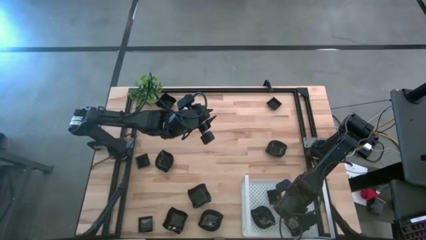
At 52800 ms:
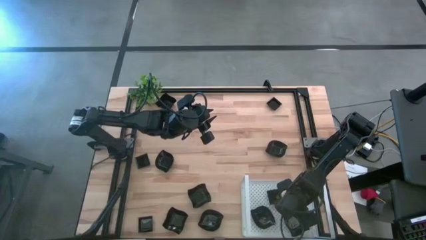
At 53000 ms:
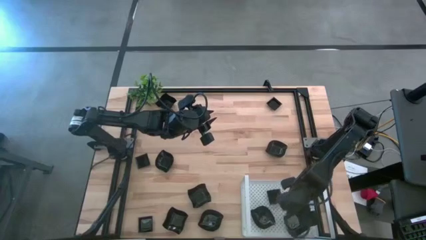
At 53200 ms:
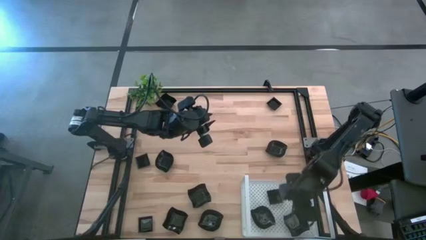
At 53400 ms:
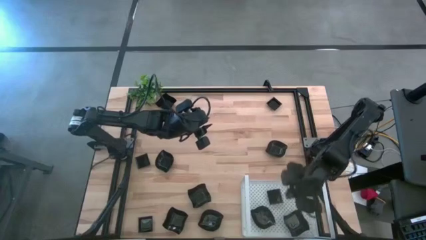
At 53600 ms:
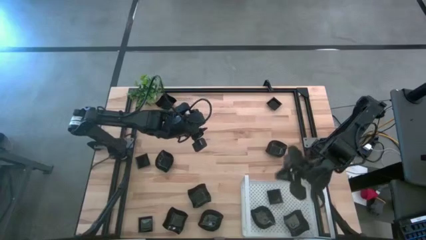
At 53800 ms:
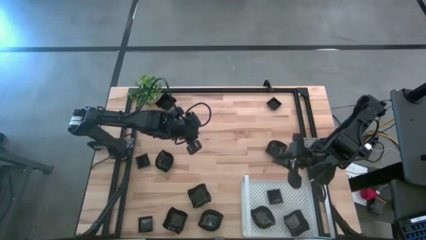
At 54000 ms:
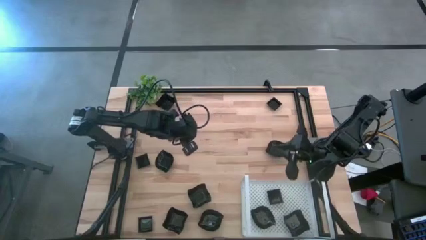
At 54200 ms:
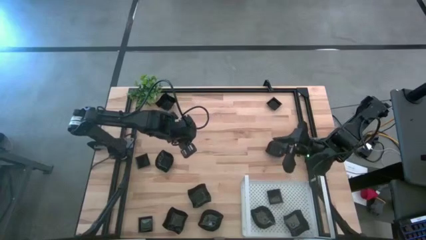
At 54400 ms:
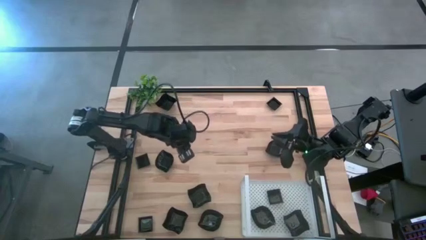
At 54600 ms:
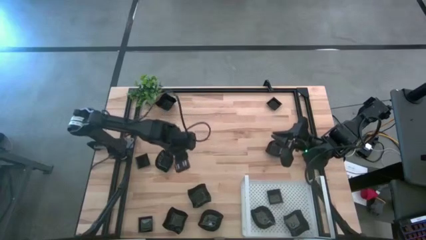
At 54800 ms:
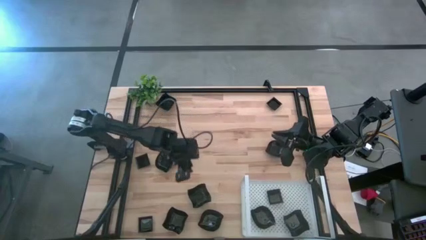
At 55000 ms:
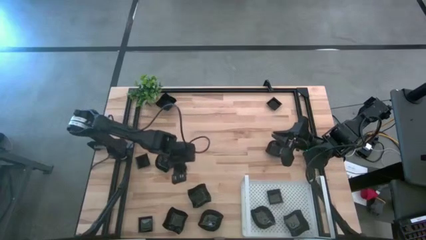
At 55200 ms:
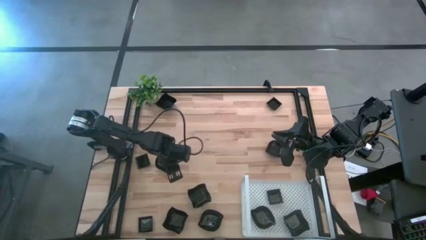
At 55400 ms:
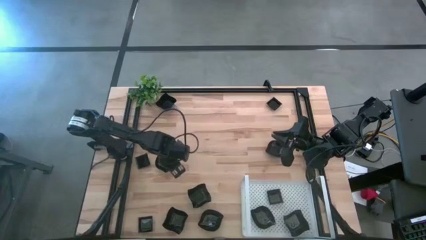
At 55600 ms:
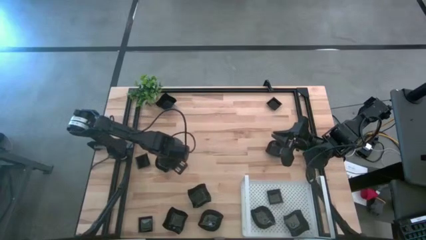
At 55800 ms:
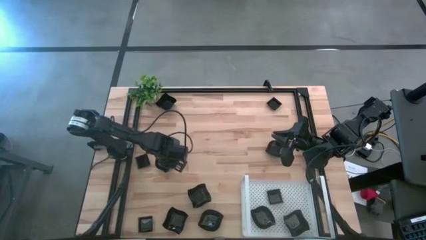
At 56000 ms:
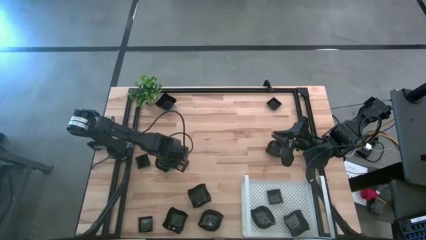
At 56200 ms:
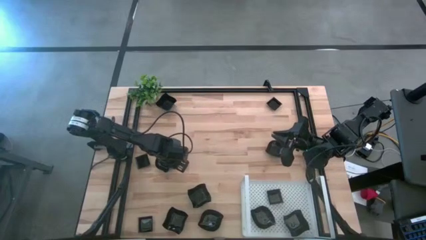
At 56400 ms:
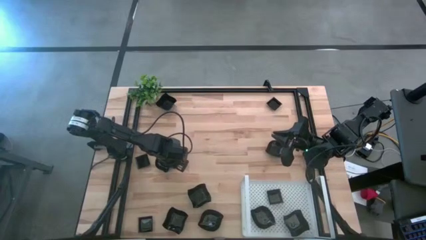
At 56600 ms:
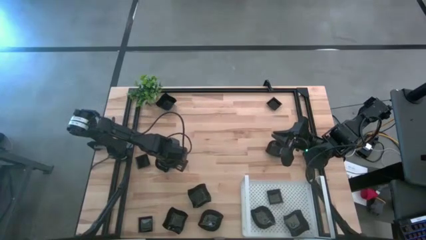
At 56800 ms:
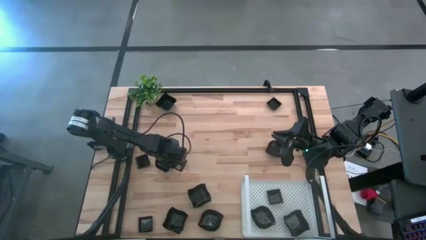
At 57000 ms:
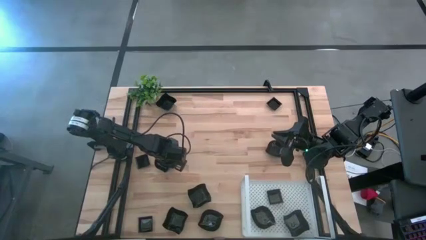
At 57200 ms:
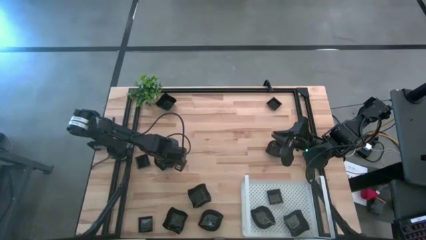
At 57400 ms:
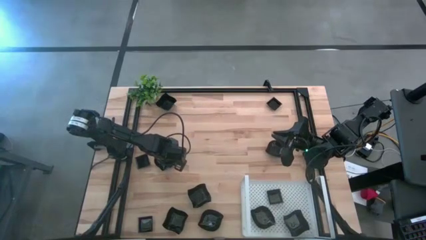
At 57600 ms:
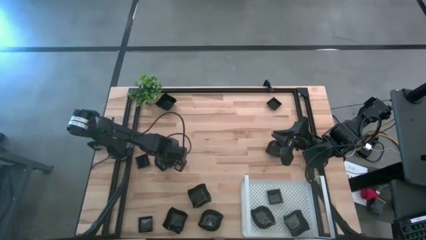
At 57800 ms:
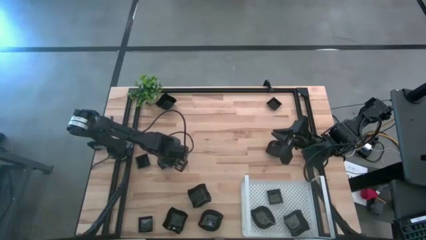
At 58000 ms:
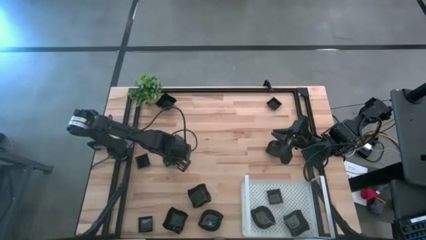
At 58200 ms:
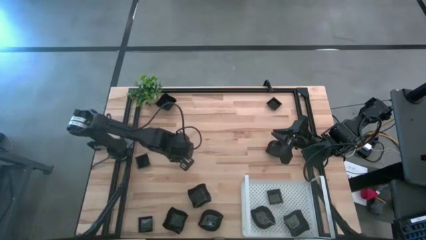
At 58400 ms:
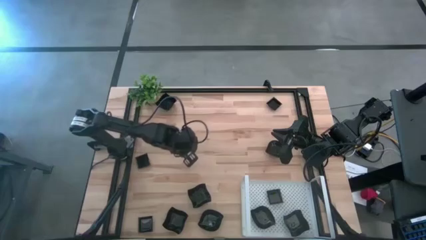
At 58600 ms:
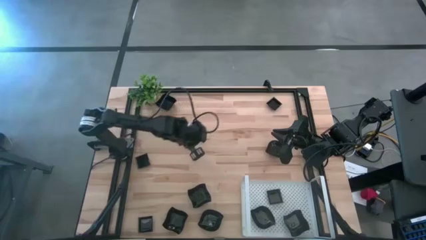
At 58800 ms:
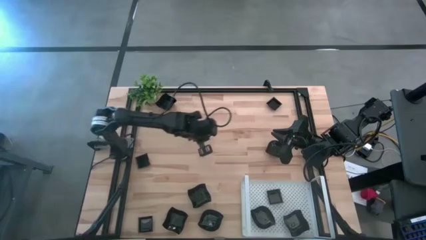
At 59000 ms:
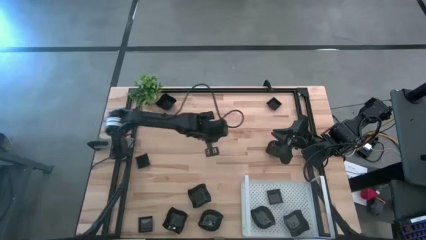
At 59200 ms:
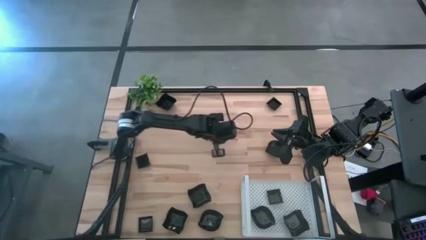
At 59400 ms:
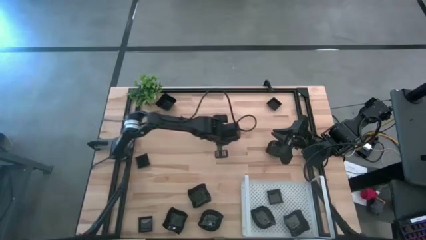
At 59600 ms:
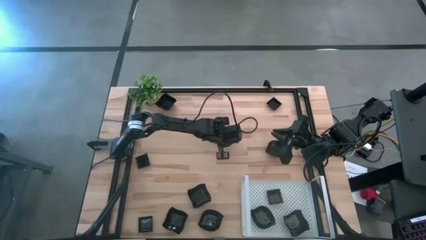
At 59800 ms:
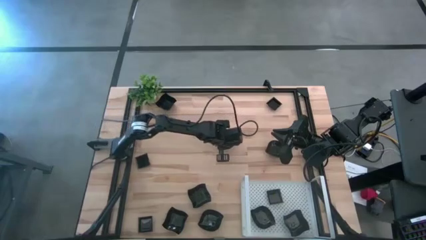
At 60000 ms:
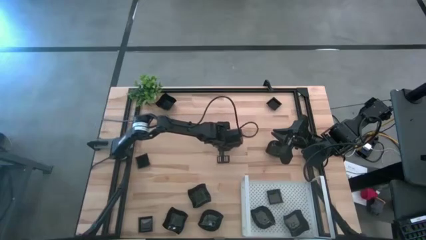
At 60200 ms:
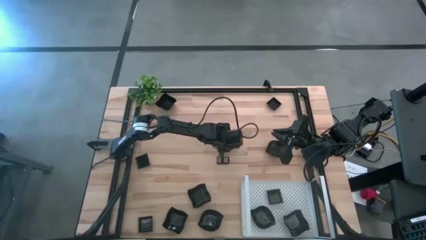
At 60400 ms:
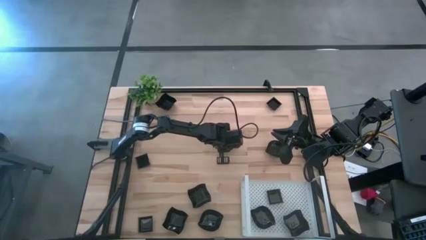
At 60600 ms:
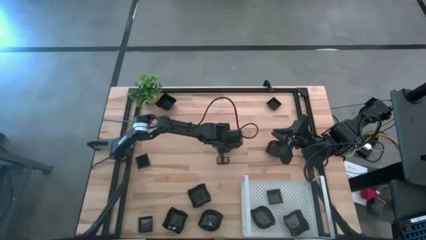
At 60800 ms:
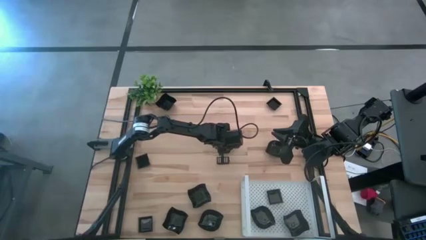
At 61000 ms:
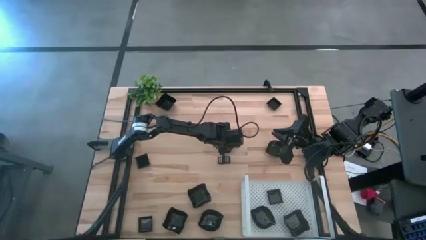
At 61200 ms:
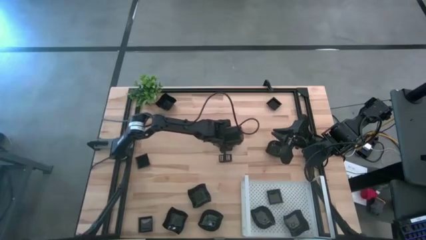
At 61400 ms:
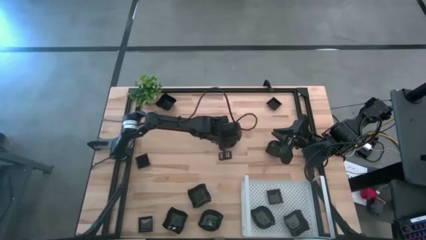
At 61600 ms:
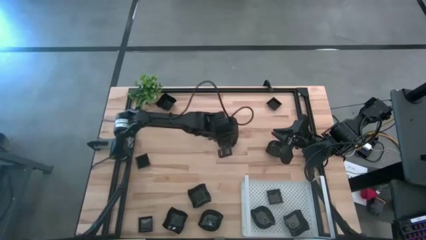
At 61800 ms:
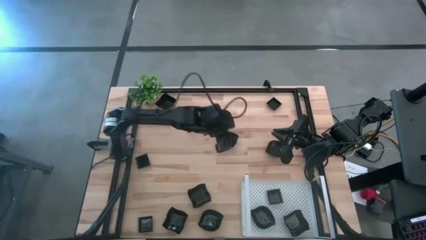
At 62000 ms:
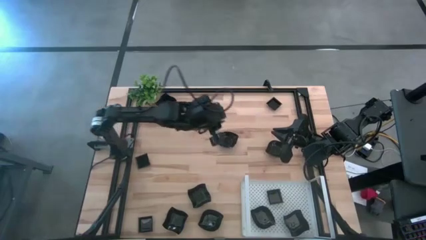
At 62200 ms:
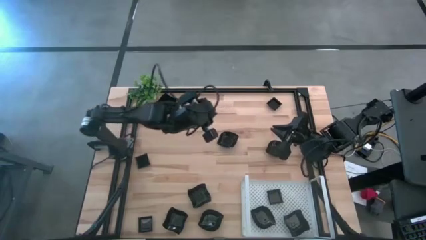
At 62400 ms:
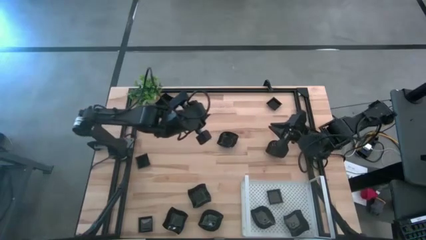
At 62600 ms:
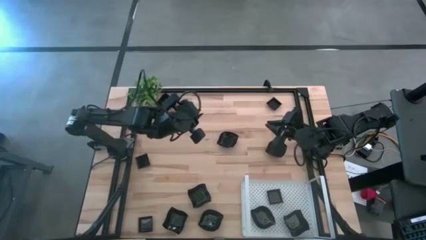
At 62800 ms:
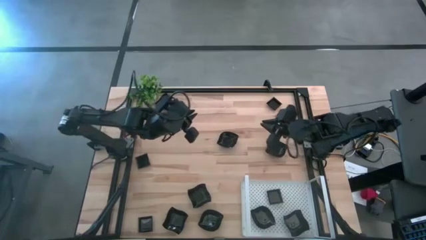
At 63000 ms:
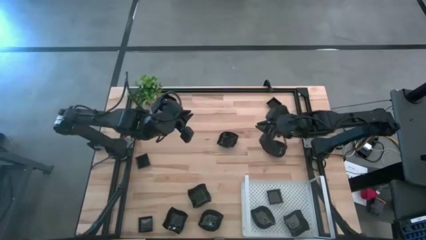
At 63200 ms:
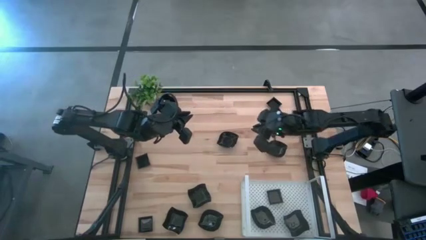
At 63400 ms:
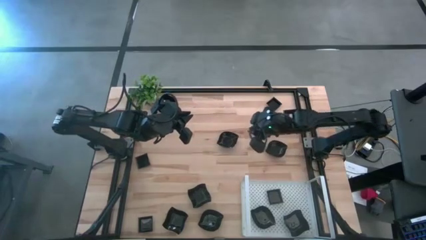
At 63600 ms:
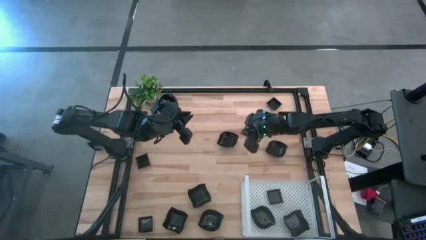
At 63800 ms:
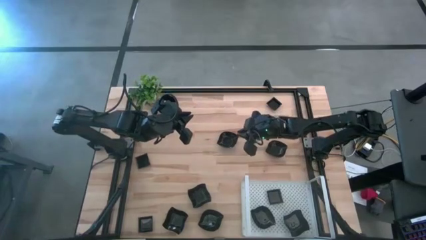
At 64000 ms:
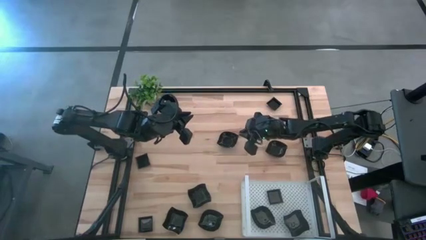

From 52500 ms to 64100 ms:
Task: Pick & Place Mini shaped plates
Stack the leaf shaped plate on top of the other leaf shaped plate on the shelf
